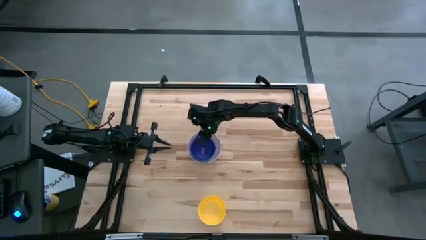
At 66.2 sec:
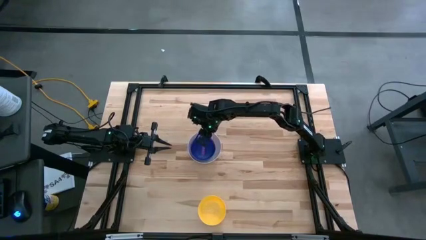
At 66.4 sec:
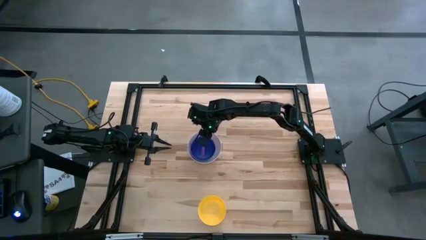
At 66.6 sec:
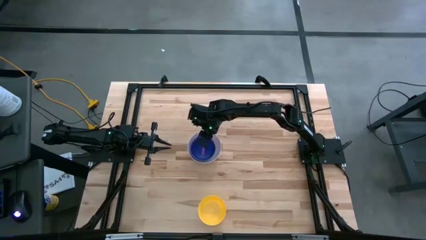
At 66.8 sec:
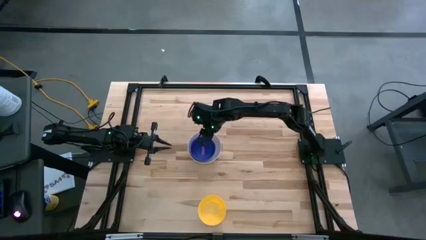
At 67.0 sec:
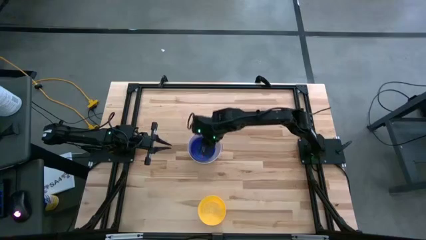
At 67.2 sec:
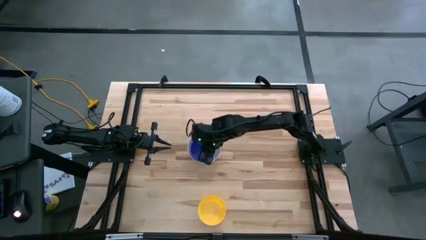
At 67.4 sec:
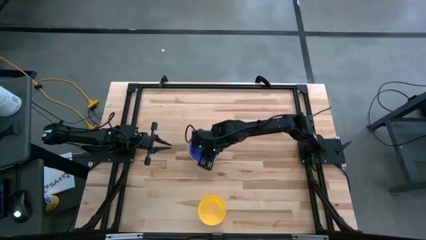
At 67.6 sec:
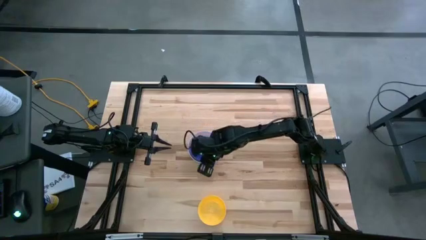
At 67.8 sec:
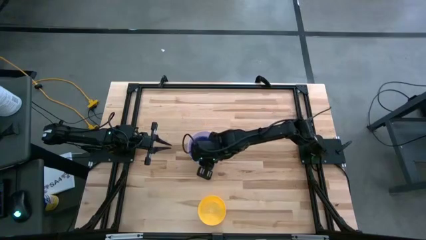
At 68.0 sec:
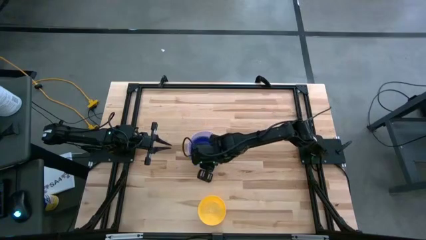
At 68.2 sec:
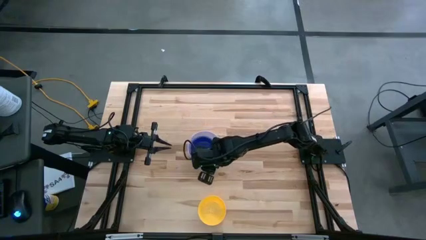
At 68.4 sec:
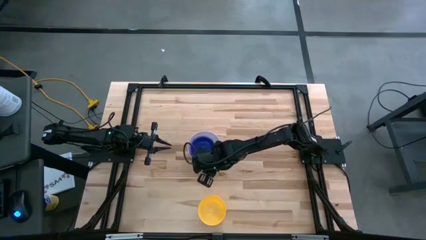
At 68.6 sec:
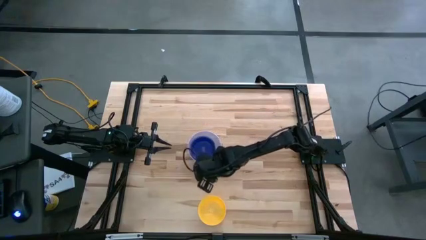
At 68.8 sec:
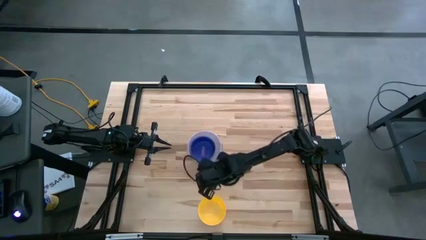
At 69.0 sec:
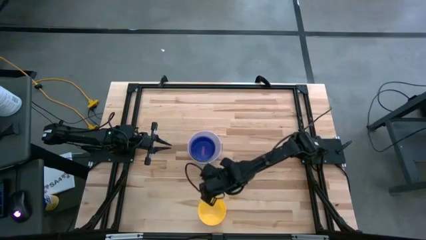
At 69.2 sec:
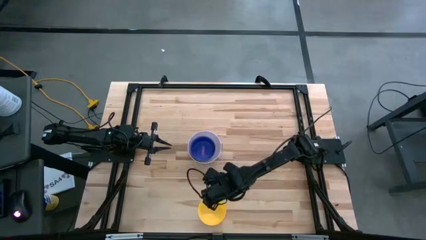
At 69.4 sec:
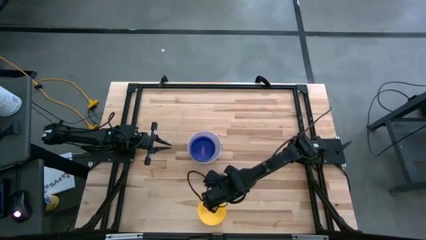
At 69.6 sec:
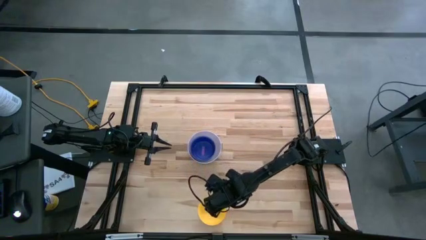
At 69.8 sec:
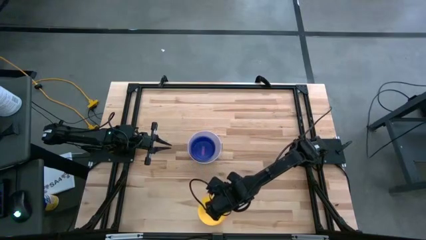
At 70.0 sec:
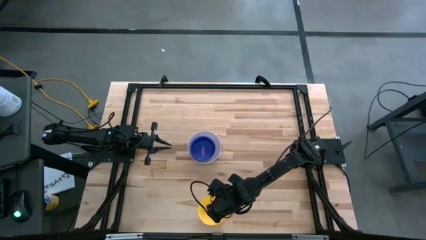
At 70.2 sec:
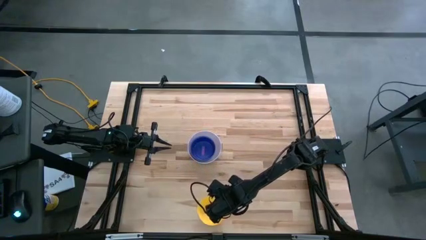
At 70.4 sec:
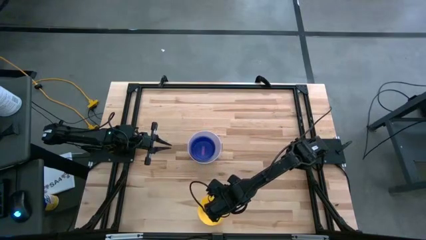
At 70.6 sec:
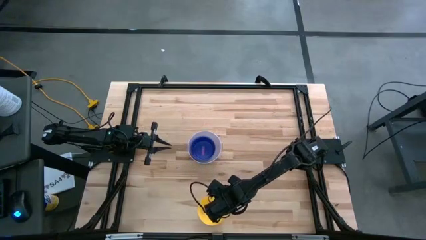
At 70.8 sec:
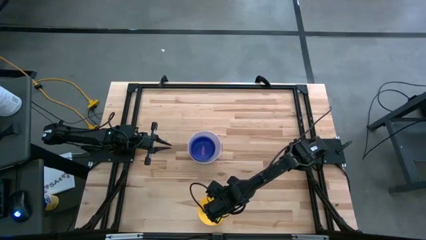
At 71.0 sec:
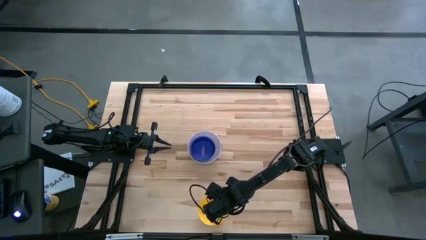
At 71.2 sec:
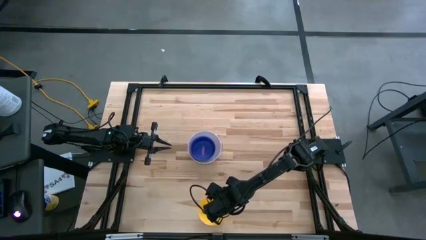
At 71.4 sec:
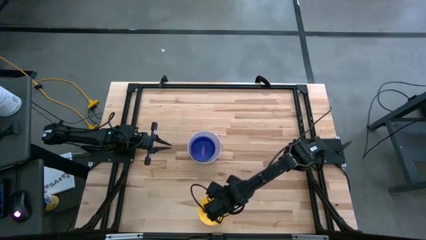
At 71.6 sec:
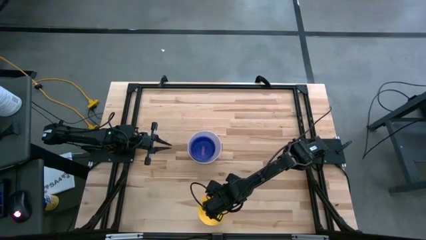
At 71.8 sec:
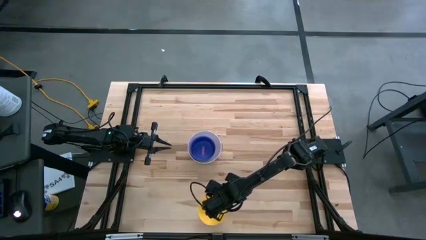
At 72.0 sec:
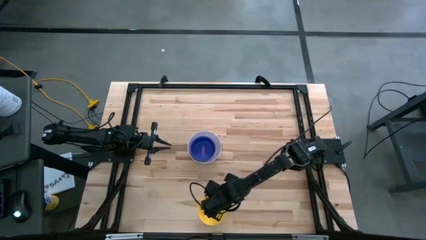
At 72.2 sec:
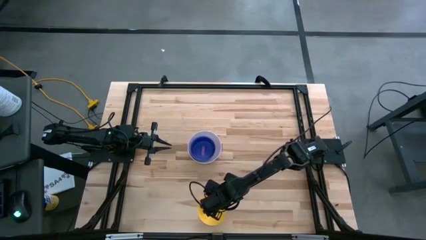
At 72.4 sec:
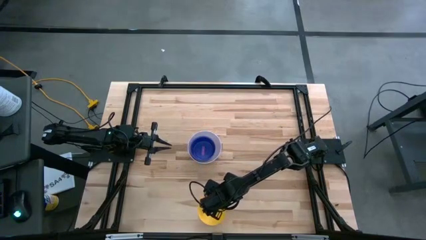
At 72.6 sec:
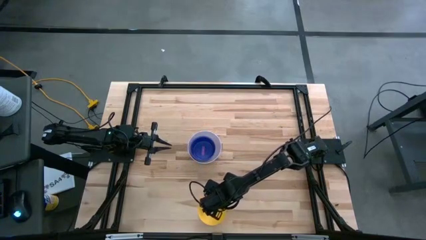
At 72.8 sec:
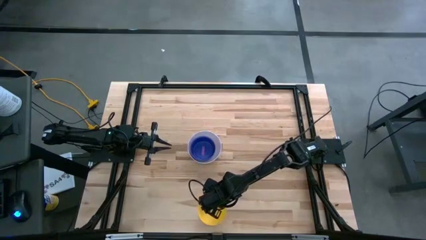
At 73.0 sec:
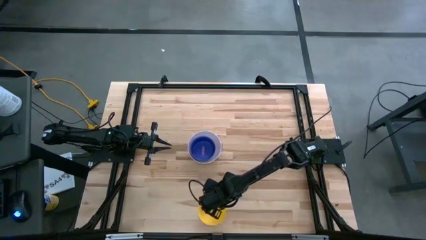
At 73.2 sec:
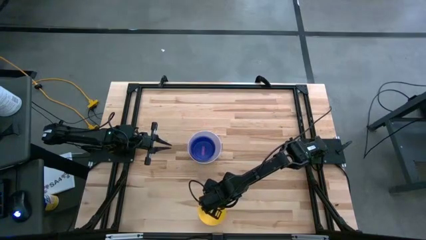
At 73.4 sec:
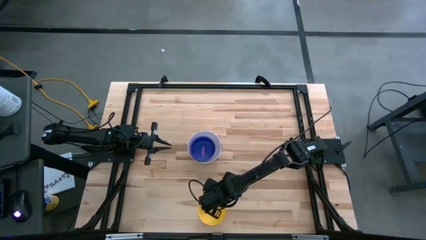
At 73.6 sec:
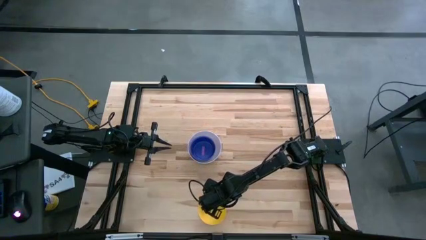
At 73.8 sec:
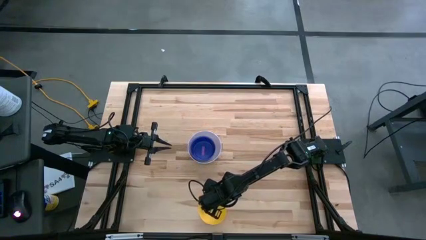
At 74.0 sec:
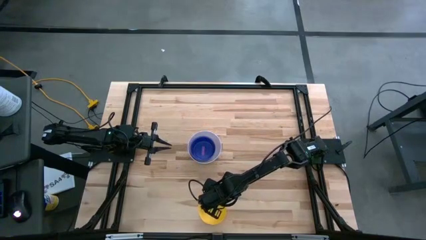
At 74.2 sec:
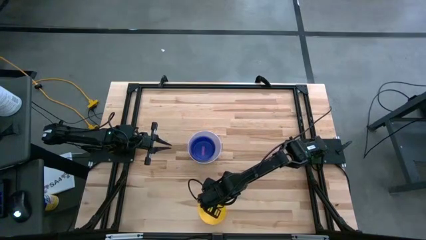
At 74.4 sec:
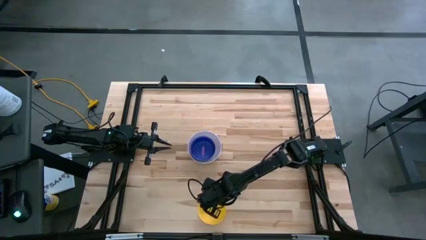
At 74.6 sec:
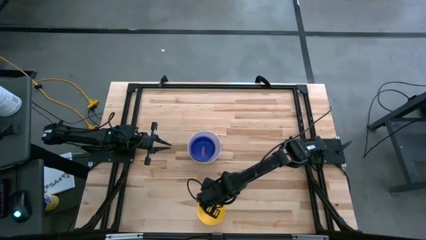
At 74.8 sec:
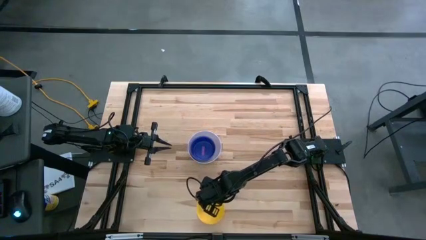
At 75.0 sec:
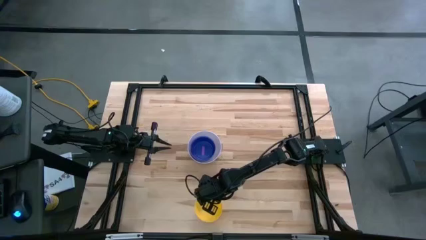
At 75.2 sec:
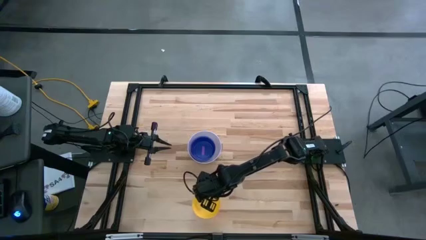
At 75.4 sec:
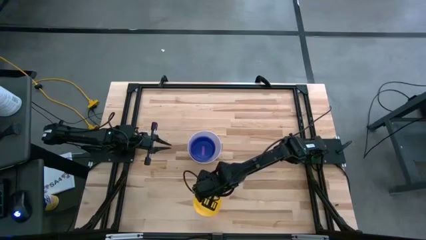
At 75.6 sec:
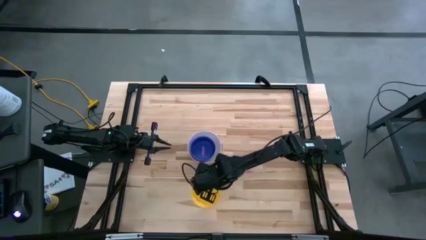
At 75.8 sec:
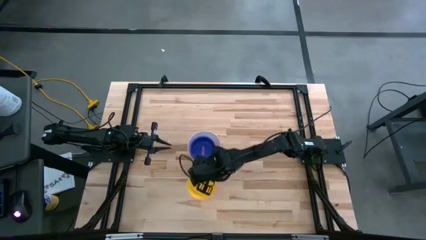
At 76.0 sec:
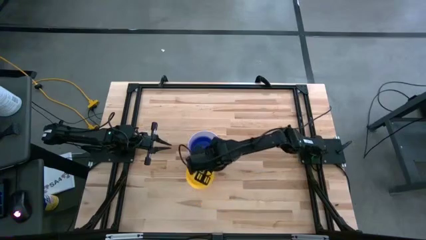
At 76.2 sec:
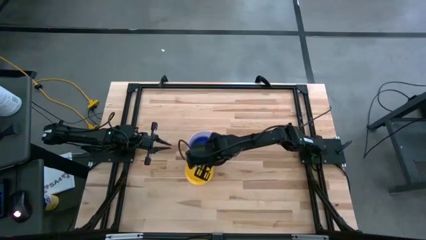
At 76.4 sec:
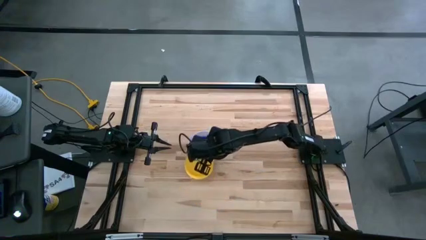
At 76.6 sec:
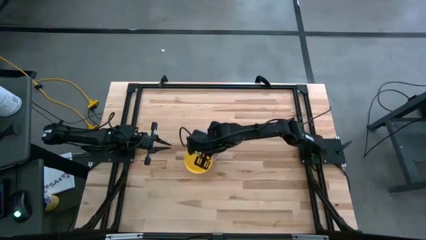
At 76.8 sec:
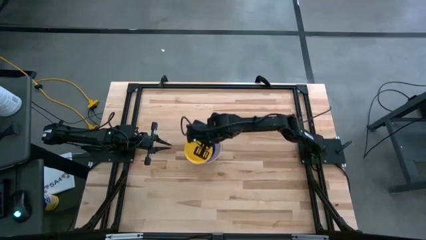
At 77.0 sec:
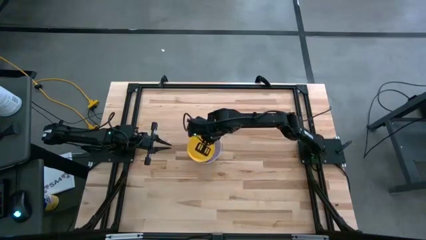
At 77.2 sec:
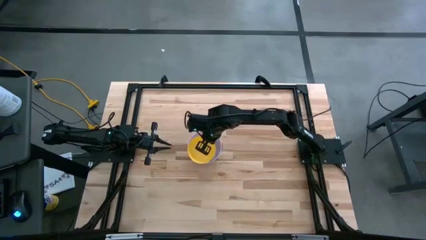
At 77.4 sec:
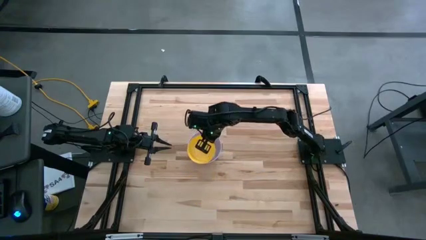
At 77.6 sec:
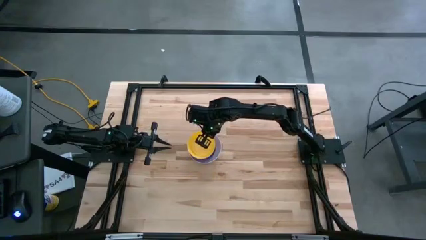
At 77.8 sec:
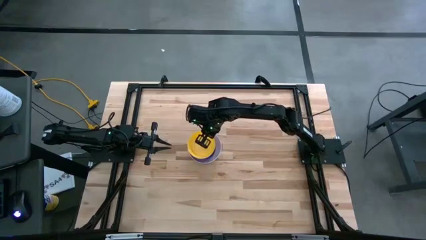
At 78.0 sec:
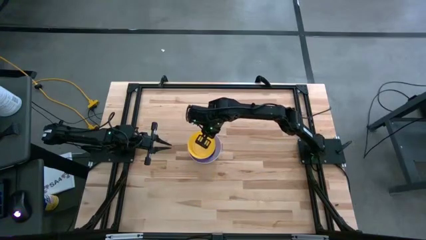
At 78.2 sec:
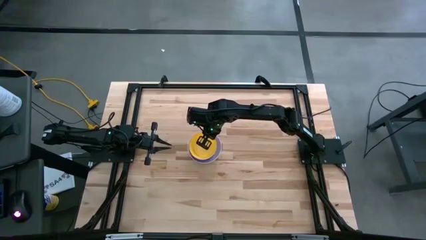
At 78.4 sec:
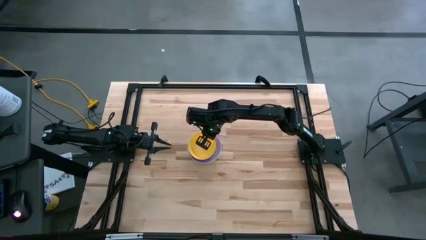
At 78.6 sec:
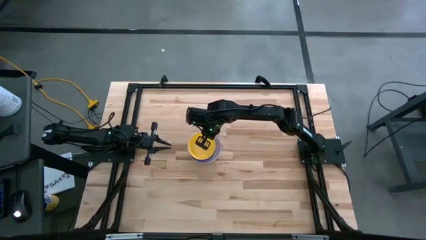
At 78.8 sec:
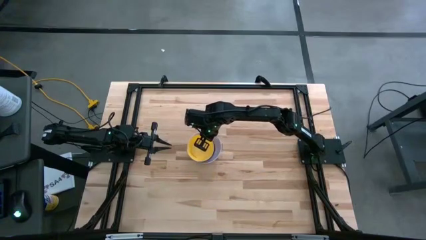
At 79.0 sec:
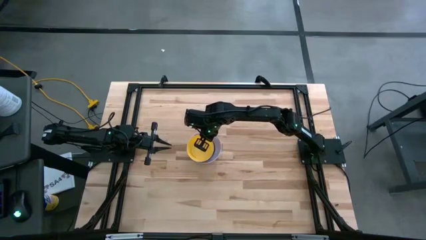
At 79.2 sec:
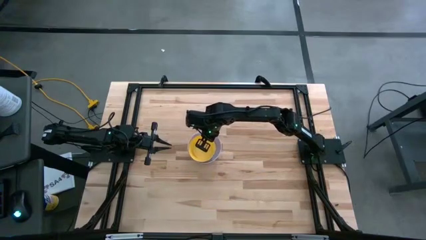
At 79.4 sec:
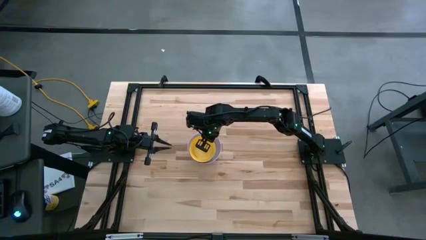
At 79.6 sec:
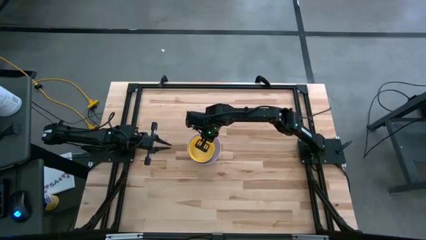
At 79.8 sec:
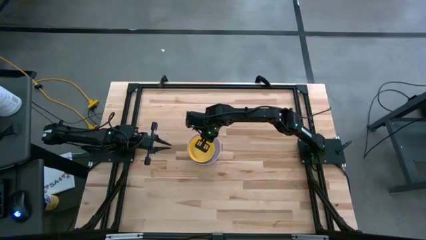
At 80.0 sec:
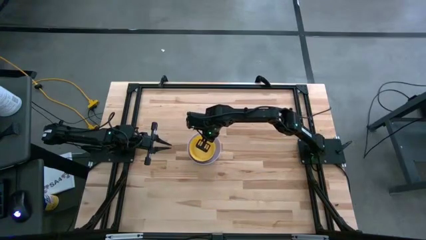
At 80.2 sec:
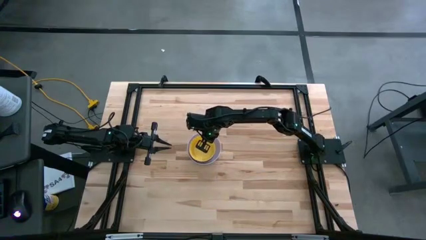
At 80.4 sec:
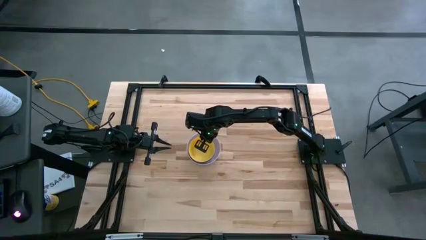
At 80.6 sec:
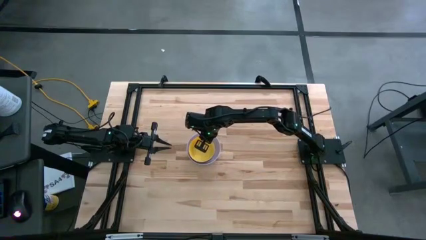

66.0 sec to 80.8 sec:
Stack the yellow bowl on the purple bowl
